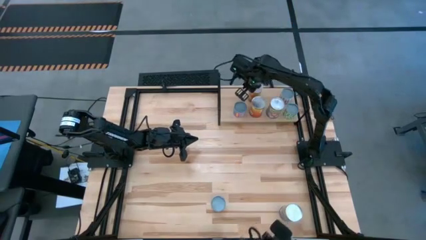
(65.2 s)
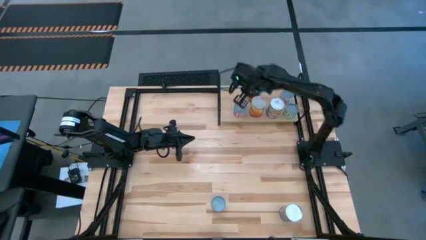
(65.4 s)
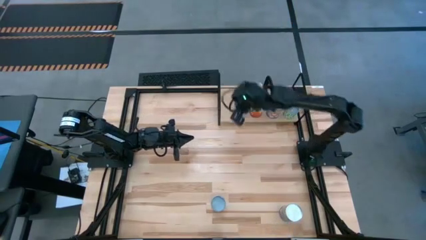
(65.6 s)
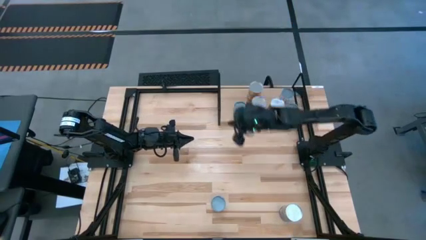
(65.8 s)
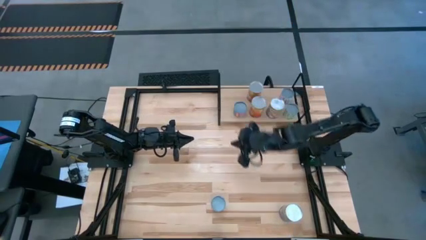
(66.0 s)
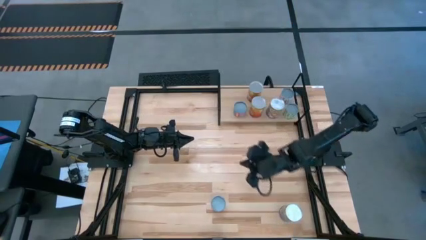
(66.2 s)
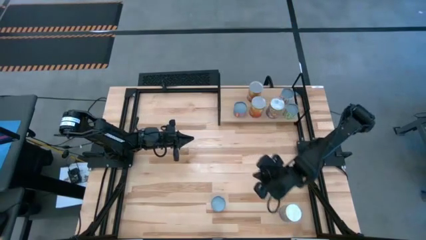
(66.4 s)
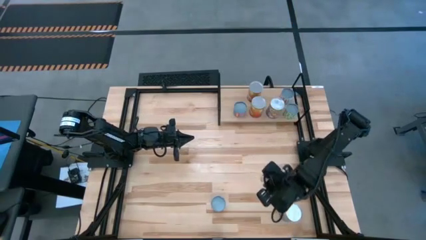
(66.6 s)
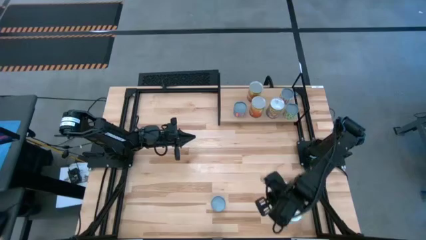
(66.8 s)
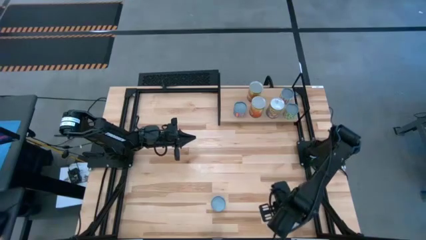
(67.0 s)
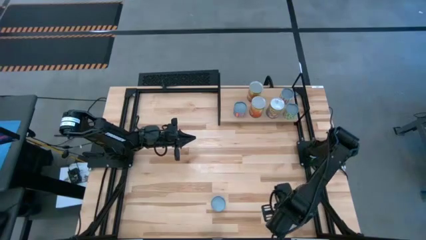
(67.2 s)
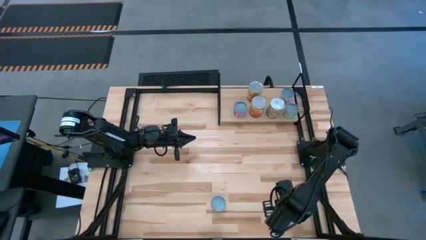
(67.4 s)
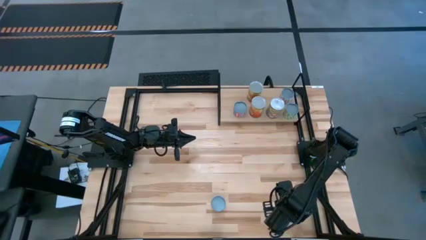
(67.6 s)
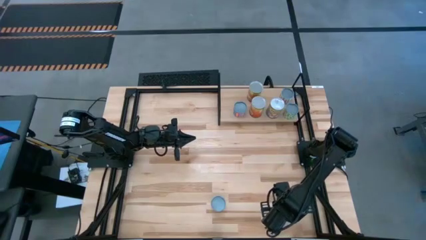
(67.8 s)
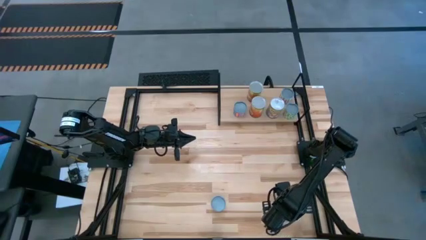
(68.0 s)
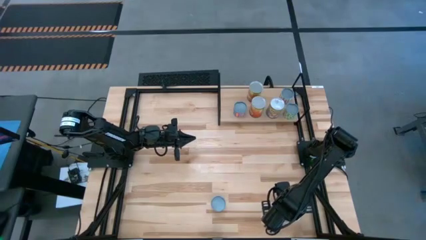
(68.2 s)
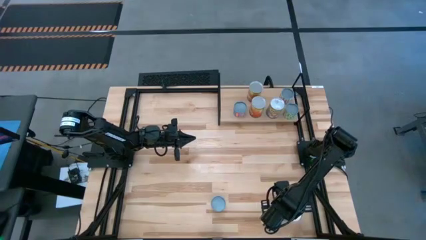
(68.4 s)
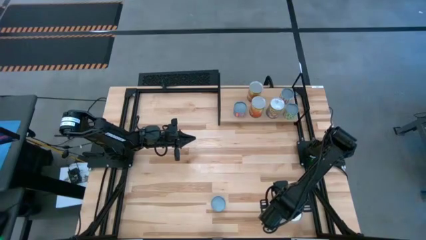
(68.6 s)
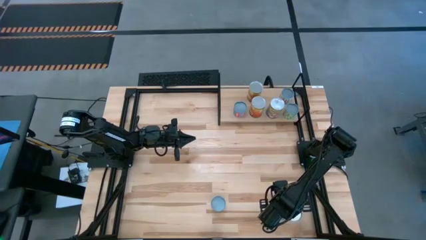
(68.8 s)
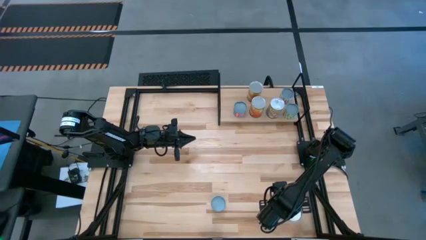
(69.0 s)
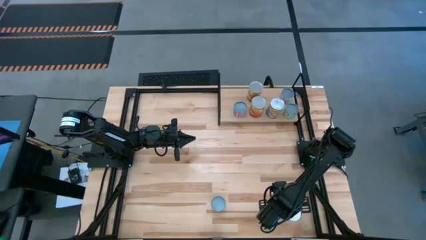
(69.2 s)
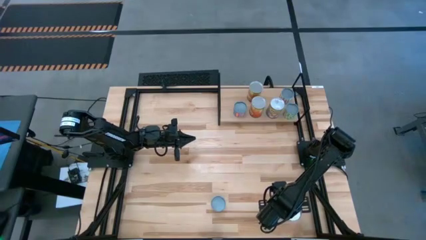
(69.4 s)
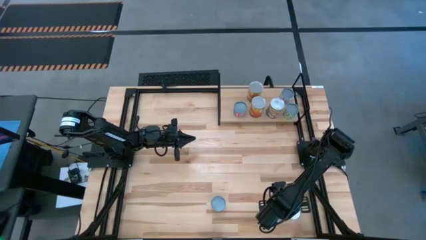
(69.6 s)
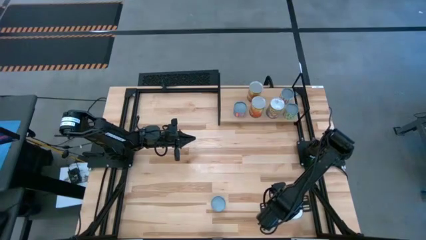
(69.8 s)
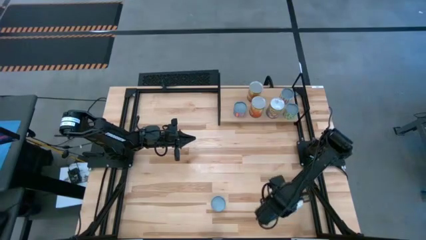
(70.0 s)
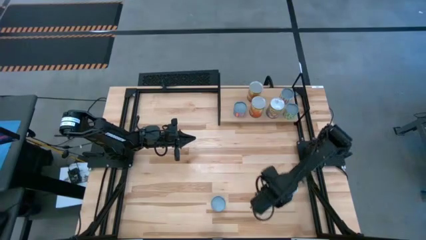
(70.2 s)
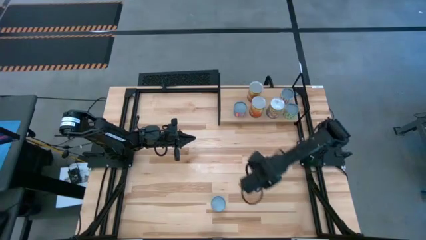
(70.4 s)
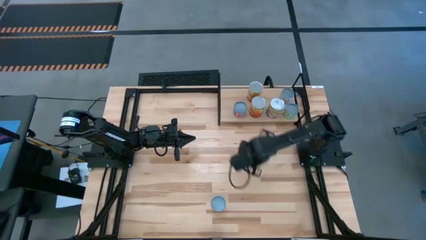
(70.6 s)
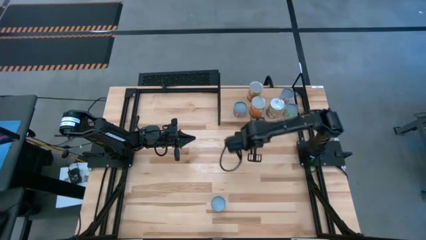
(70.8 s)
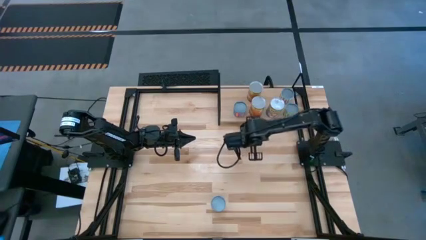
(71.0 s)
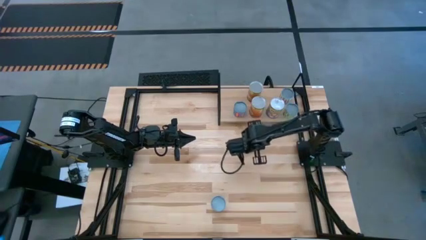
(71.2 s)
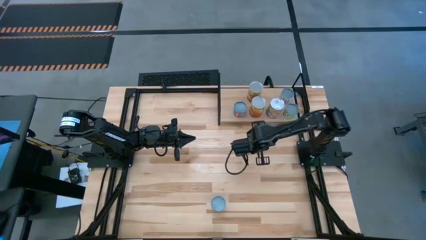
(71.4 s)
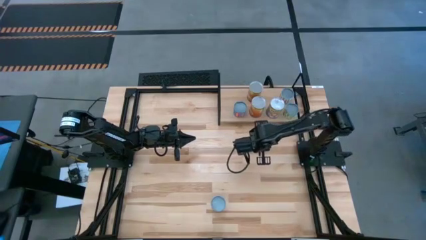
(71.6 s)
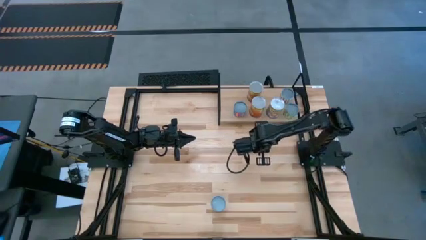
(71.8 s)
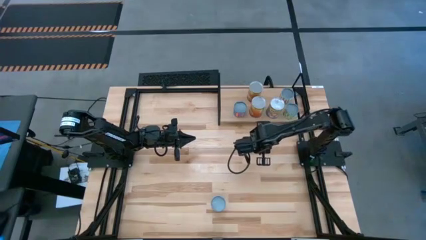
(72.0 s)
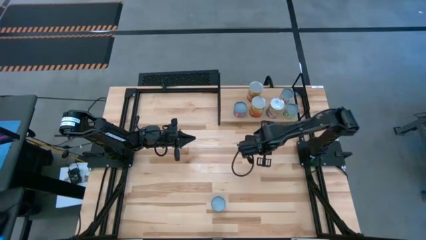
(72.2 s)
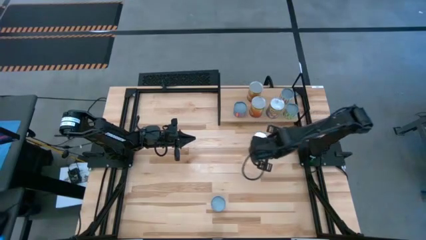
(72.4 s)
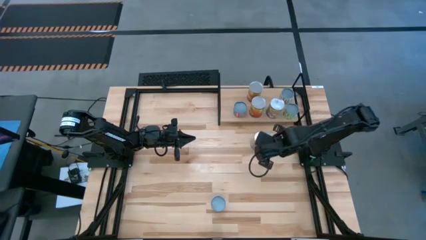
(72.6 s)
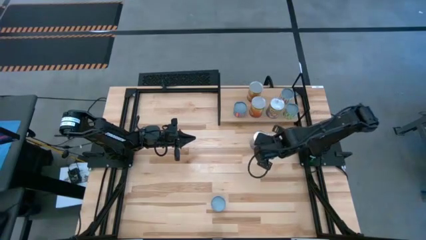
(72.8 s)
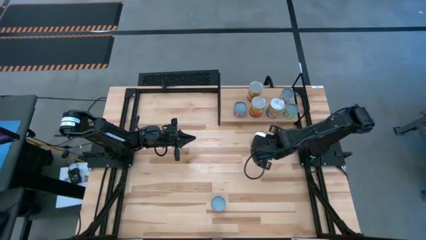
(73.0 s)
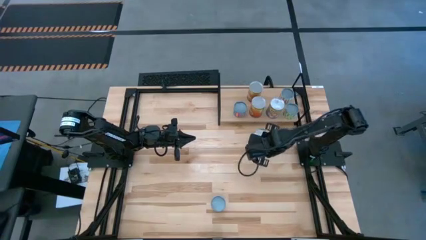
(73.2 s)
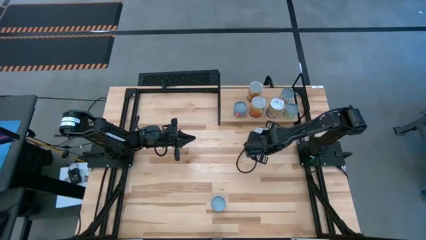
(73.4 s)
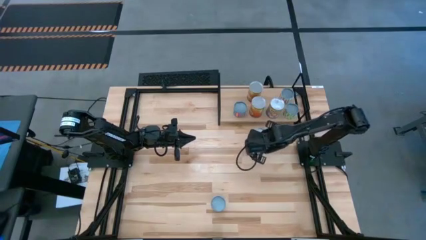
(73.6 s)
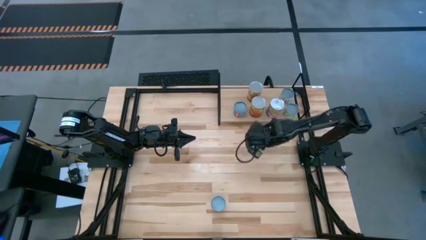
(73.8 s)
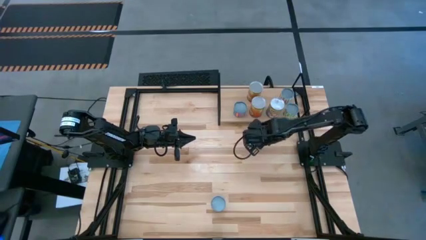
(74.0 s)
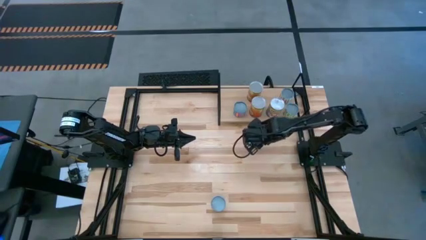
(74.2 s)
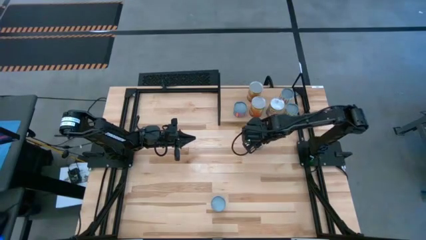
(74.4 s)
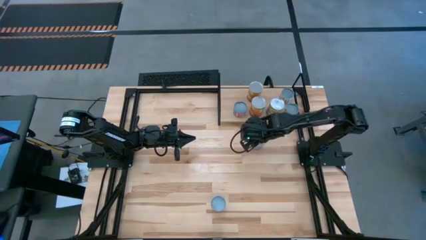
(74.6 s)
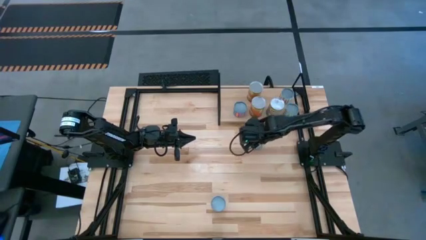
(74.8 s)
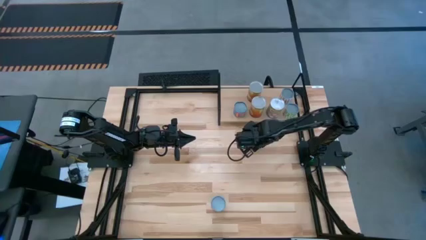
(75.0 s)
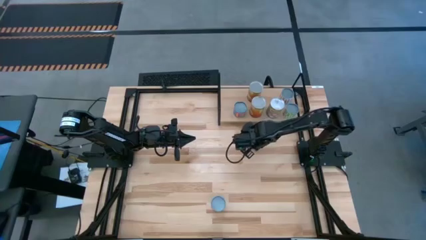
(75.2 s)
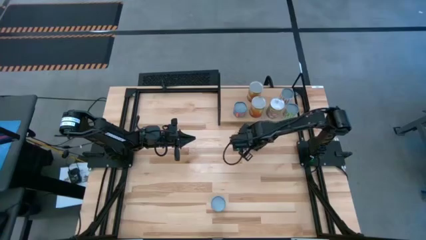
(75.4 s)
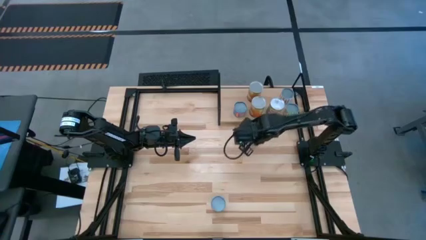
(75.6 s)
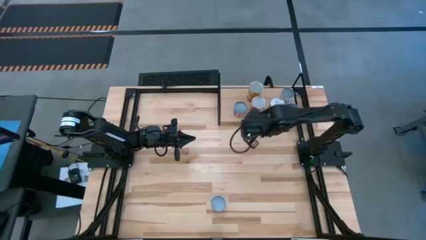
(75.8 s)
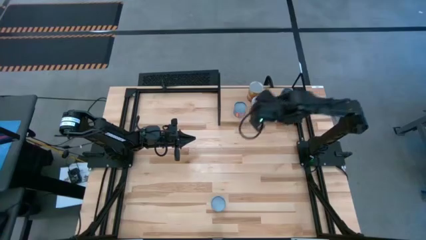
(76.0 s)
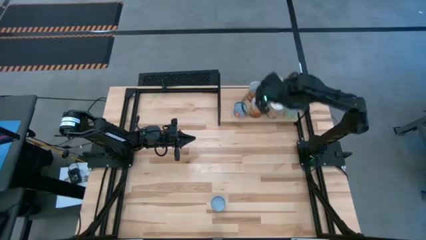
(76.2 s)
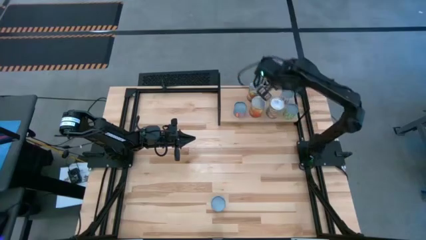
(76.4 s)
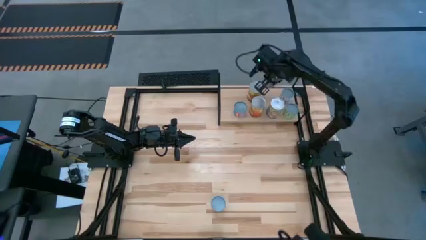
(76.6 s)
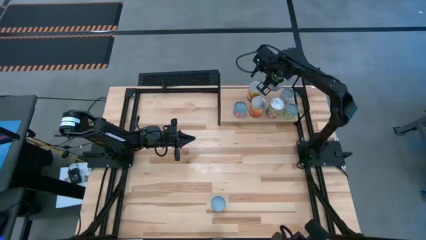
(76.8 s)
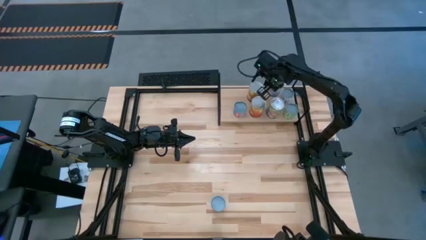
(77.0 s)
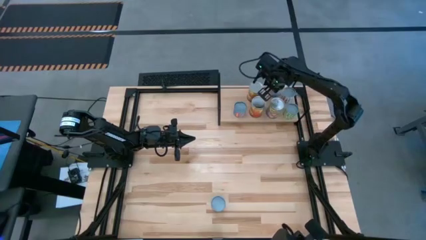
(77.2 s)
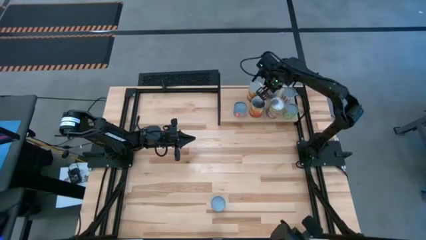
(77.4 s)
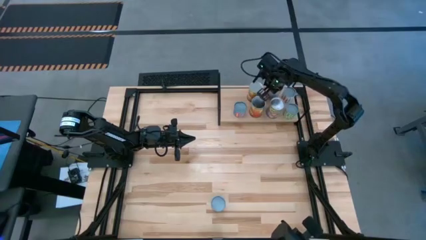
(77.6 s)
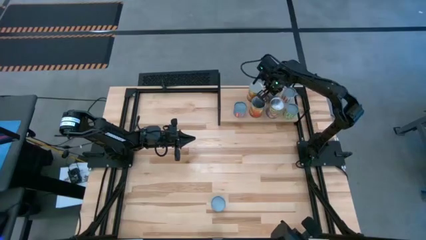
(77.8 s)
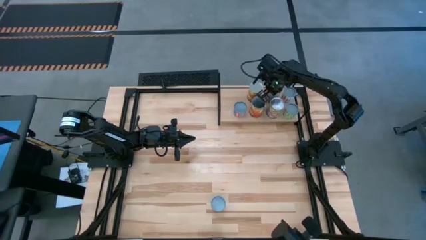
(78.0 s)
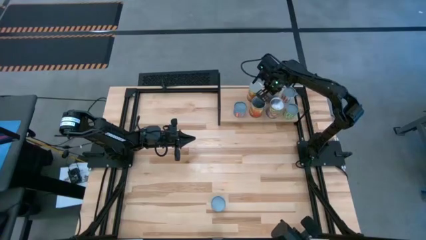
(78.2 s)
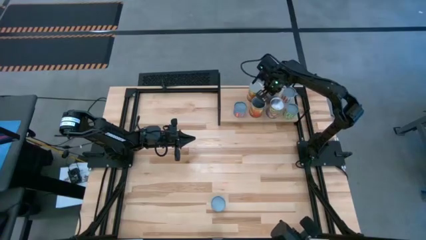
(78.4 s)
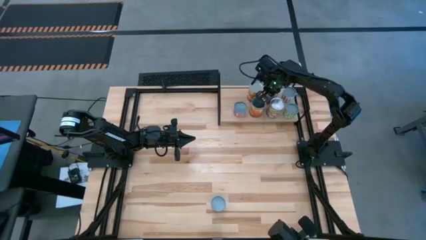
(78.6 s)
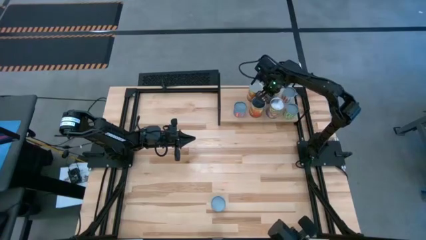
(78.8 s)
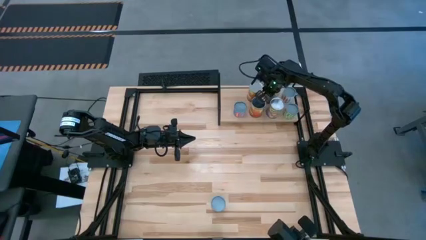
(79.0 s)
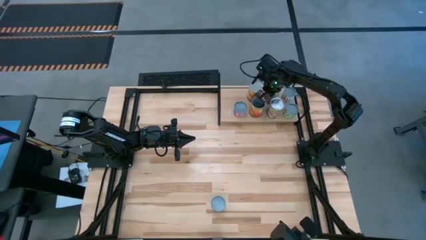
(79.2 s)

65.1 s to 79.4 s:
Task: Pick and place cans onto a shelf
Put the canned peaches on the shelf aligned with the other canned peaches

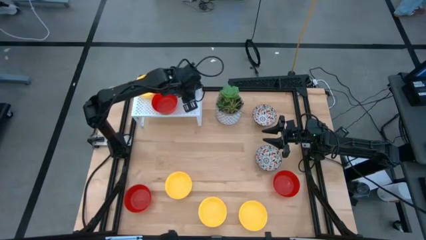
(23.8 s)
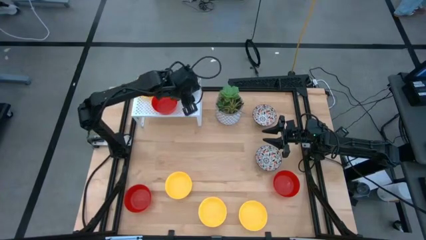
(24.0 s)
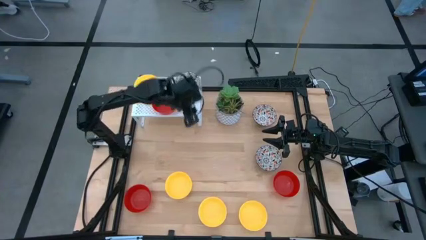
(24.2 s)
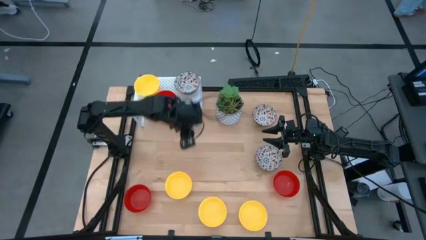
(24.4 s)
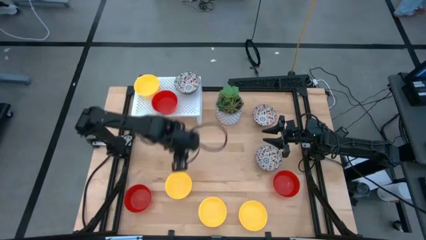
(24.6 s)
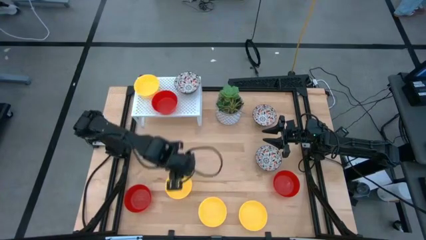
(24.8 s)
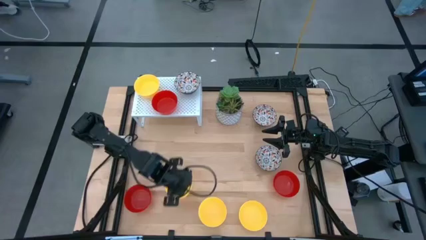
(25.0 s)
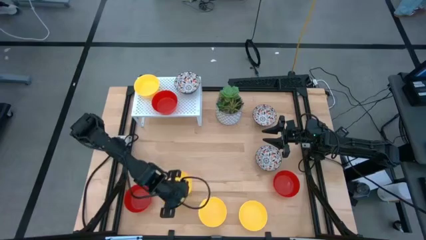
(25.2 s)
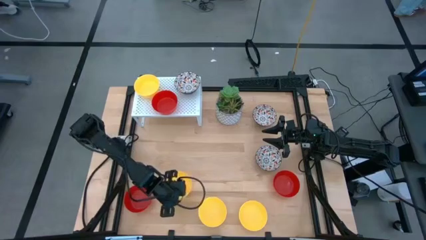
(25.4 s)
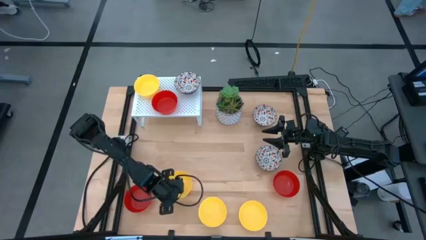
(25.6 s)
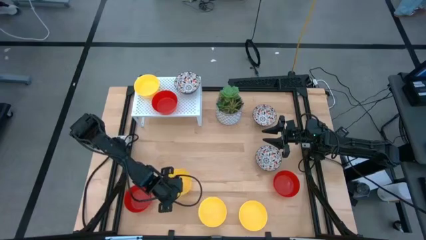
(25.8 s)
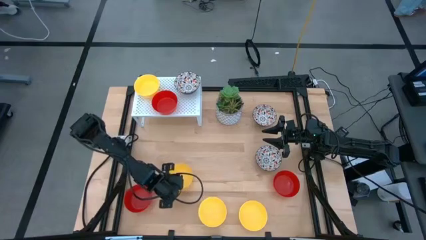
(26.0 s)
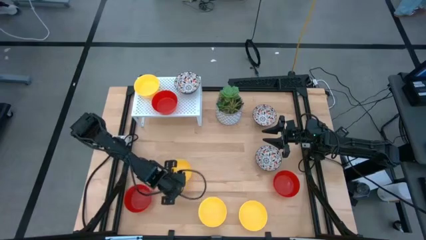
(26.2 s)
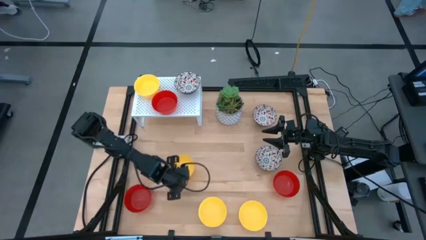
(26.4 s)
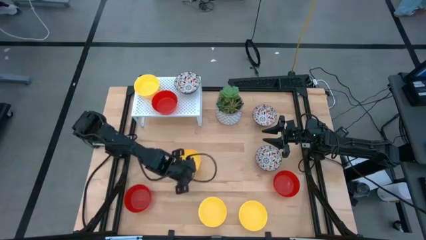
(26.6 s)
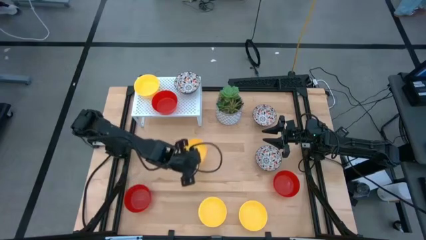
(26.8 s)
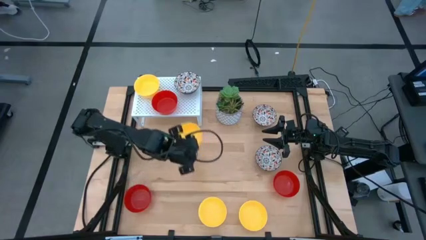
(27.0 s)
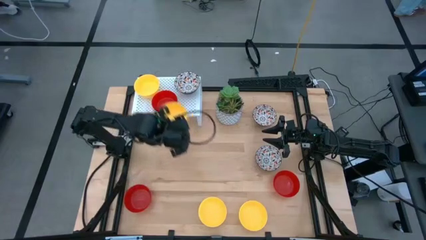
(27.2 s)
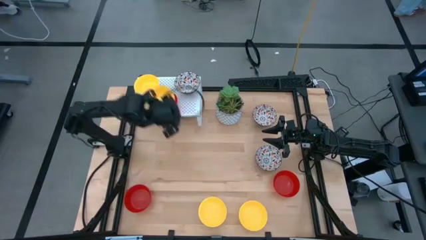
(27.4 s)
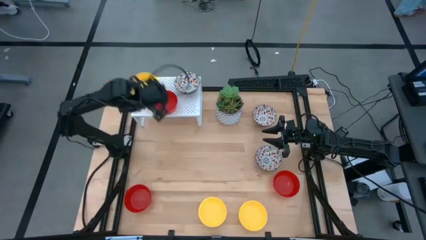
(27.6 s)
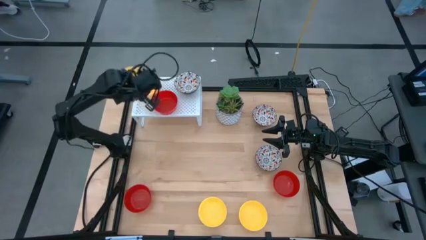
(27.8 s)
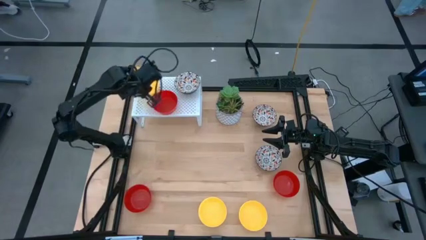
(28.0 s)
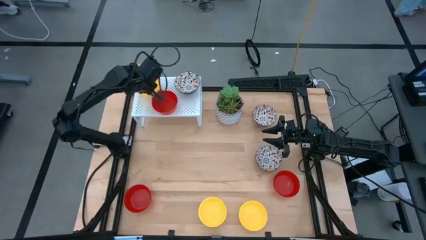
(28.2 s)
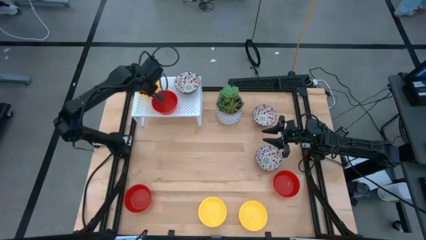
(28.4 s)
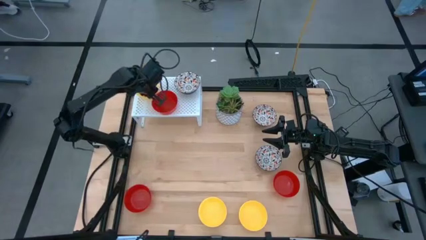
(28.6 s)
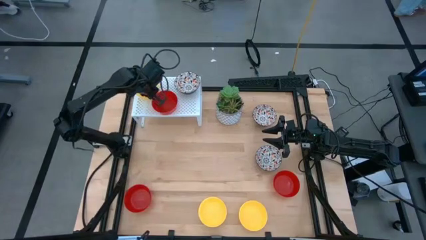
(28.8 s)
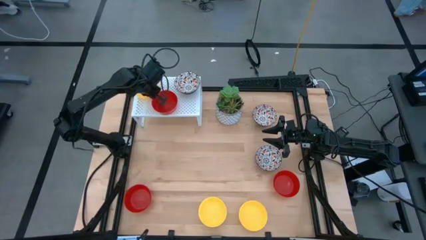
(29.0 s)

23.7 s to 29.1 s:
Task: Pick & Place Mini bowls
Stack the yellow bowl on top of the other yellow bowl on the shelf
